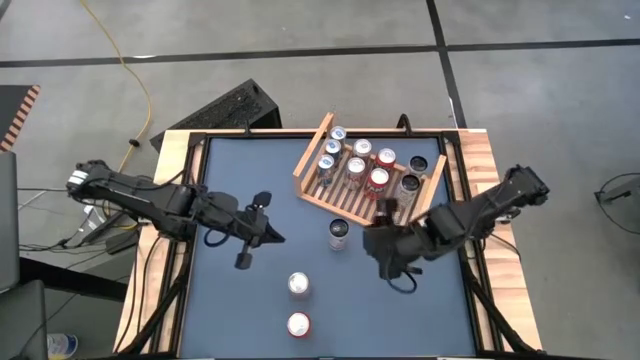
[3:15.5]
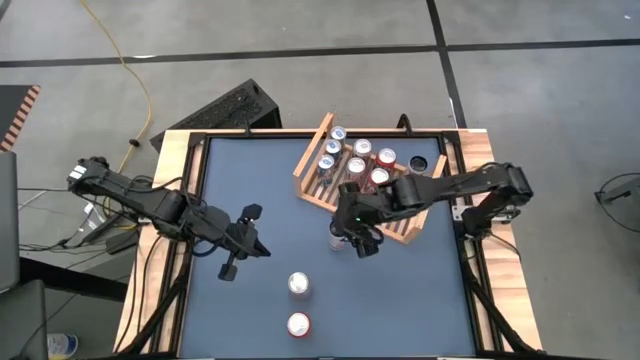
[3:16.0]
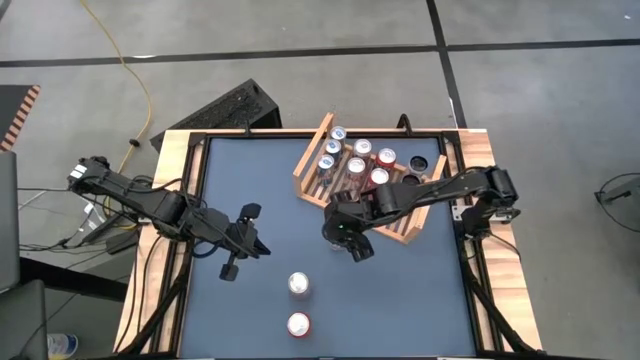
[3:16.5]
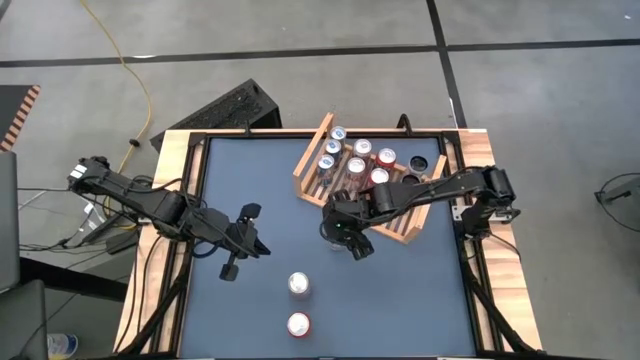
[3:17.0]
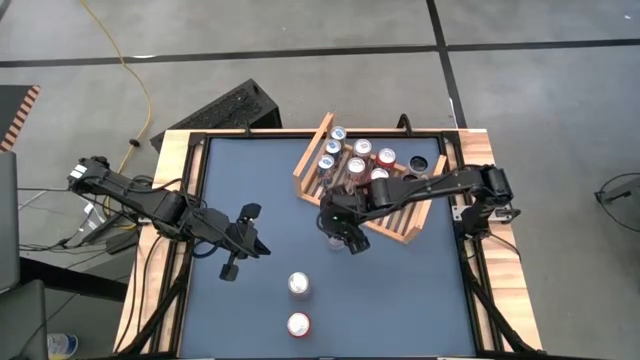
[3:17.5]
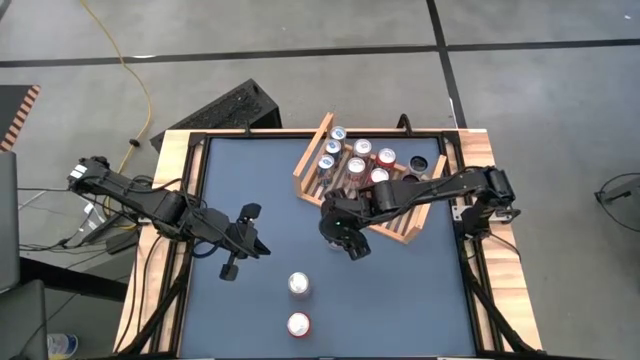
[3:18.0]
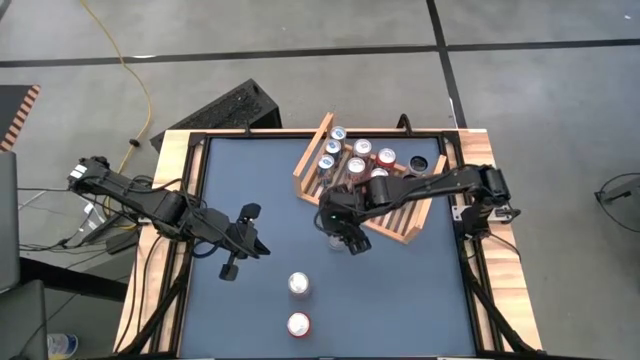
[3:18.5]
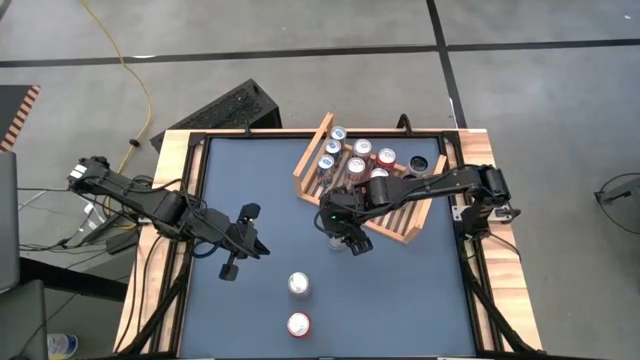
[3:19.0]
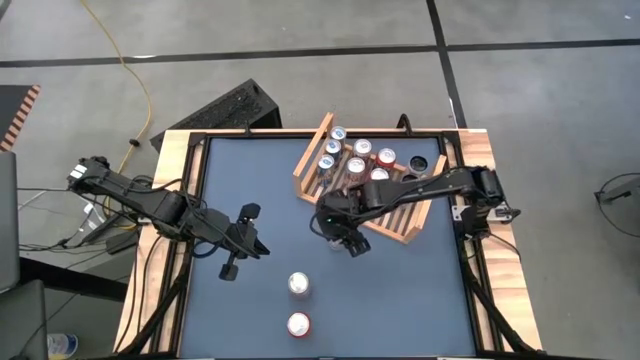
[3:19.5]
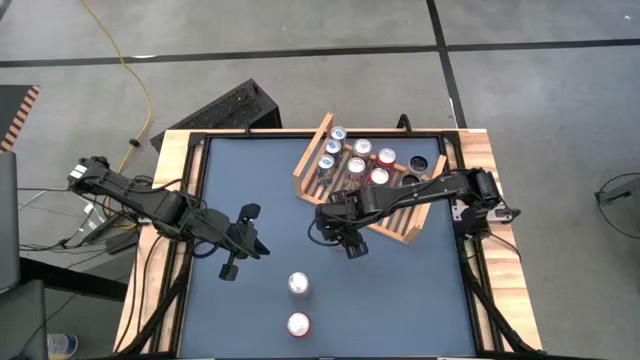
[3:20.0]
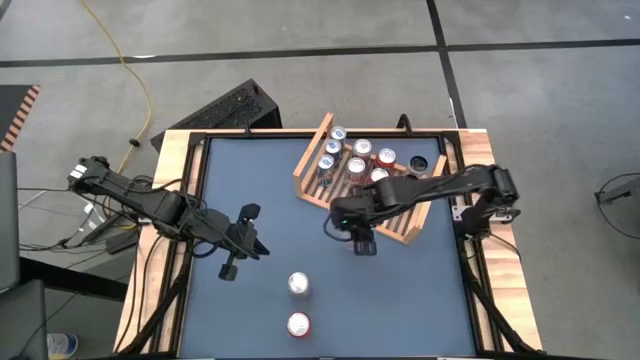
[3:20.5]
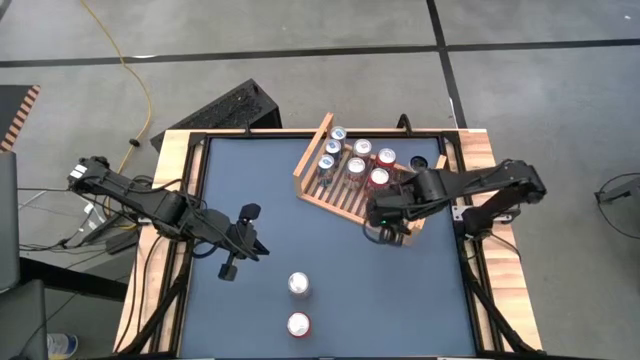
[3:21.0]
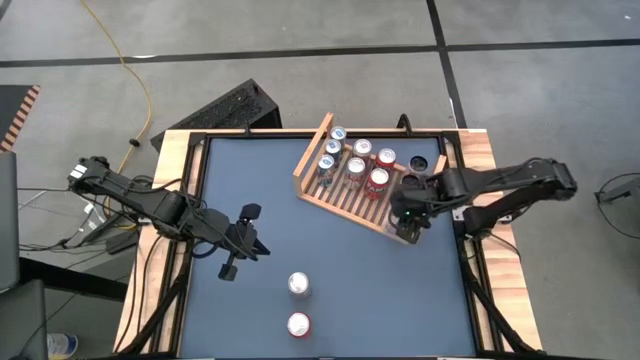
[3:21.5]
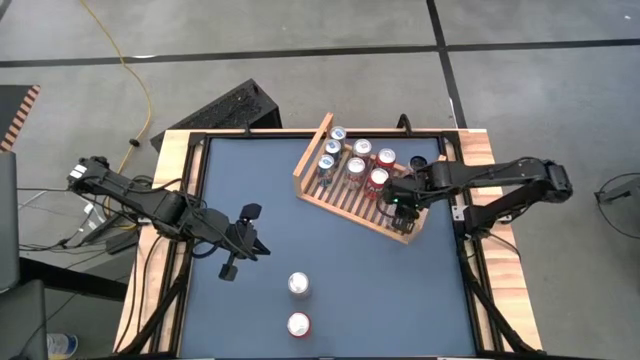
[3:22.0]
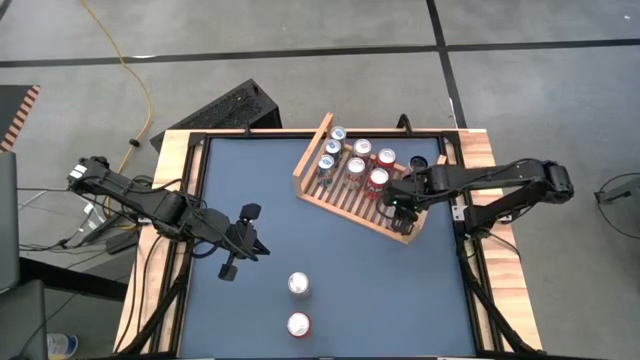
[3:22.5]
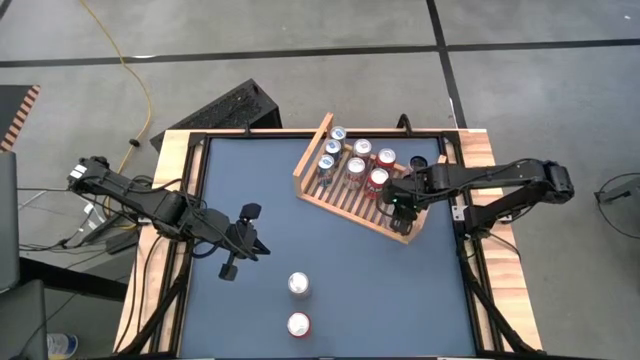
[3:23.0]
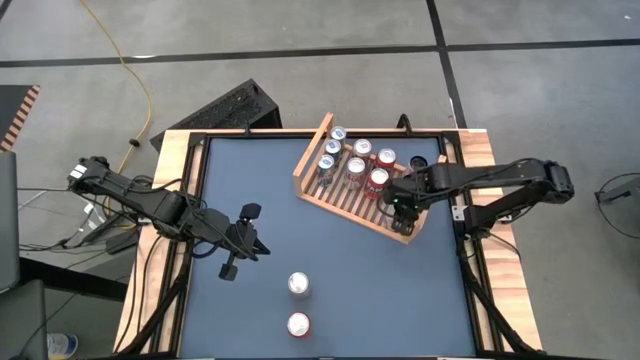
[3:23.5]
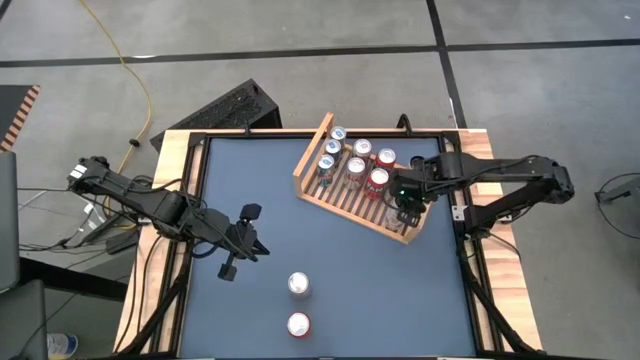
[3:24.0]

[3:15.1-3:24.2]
Task: Place canned beverage on shelf
Put the white and pink soda can aligned with the other white and pink soda cans on the shelf

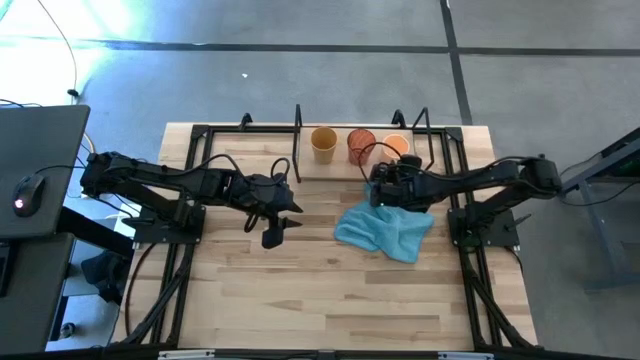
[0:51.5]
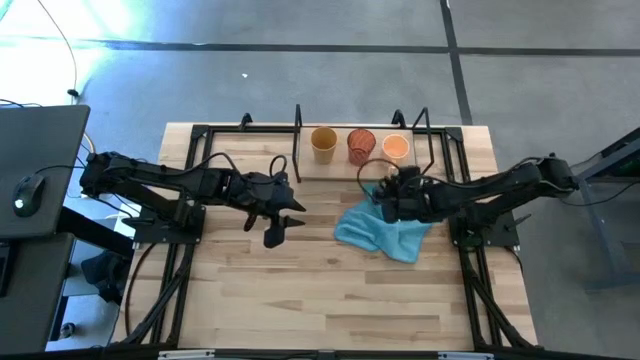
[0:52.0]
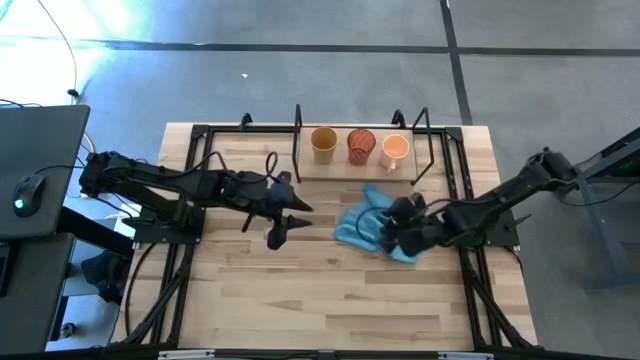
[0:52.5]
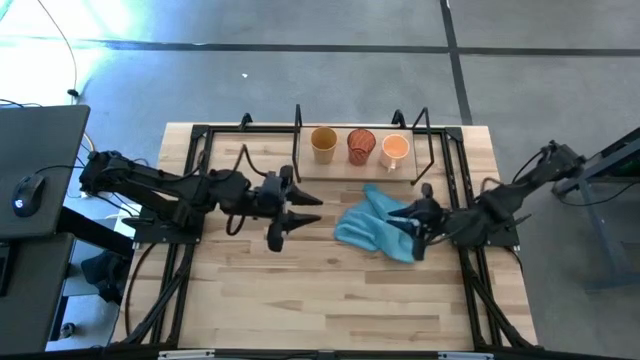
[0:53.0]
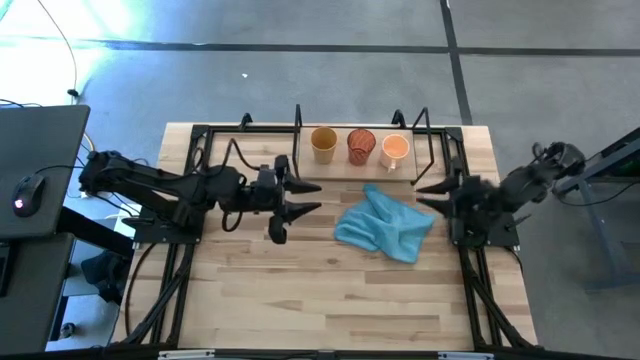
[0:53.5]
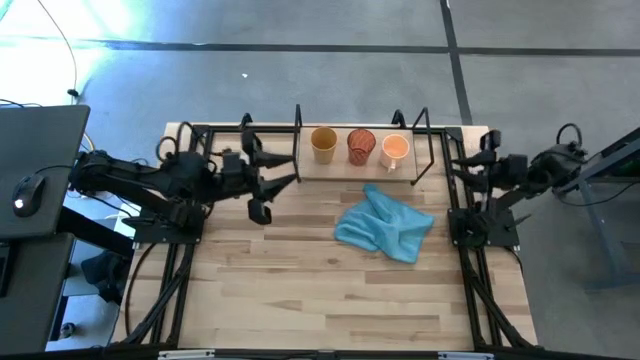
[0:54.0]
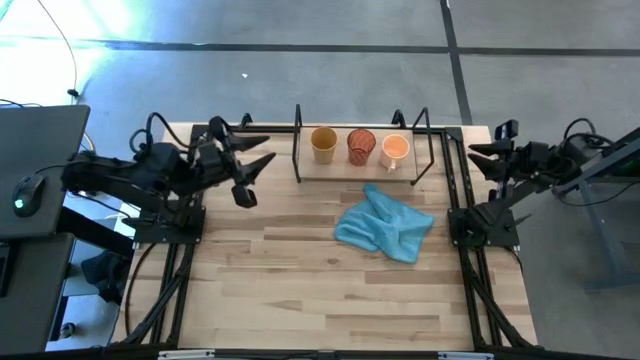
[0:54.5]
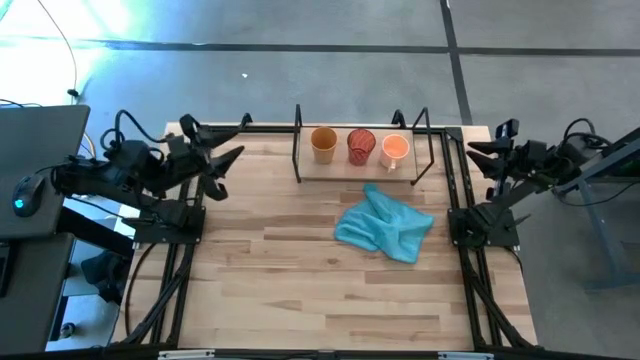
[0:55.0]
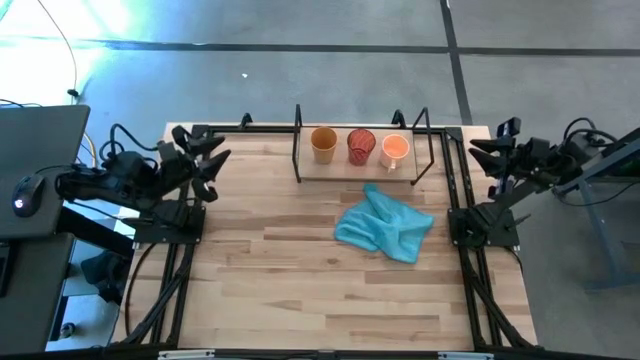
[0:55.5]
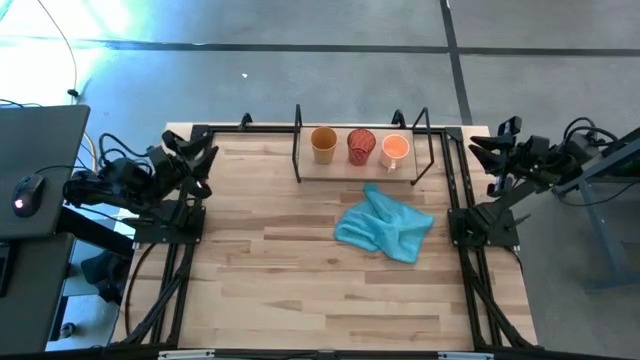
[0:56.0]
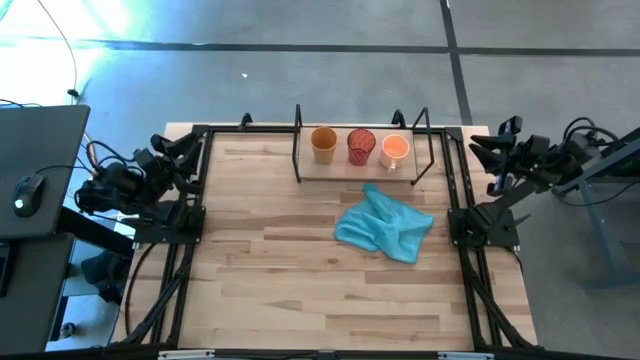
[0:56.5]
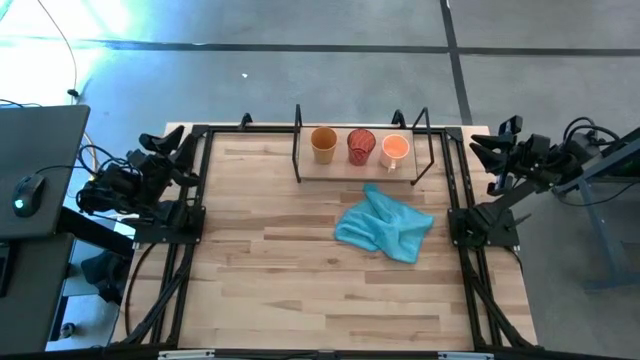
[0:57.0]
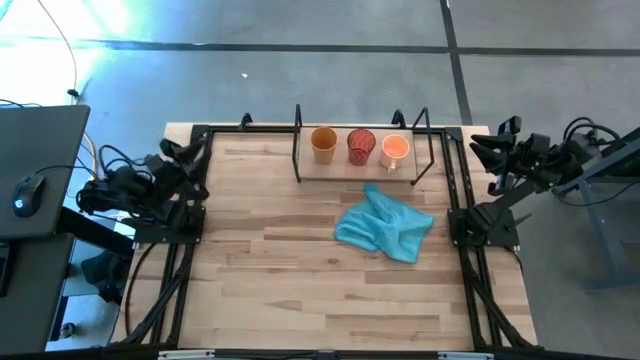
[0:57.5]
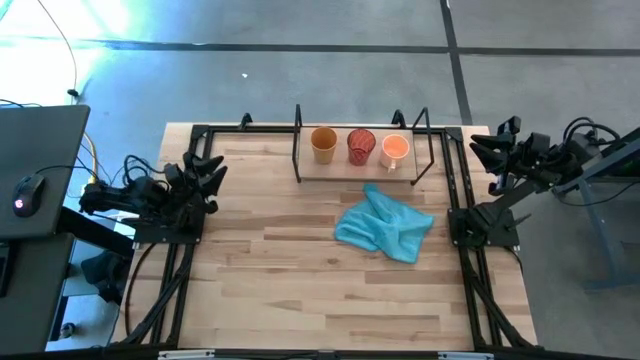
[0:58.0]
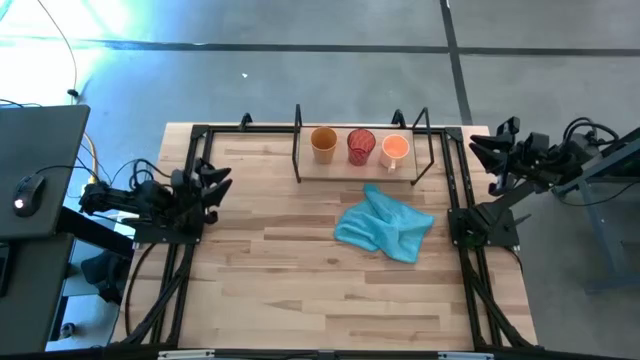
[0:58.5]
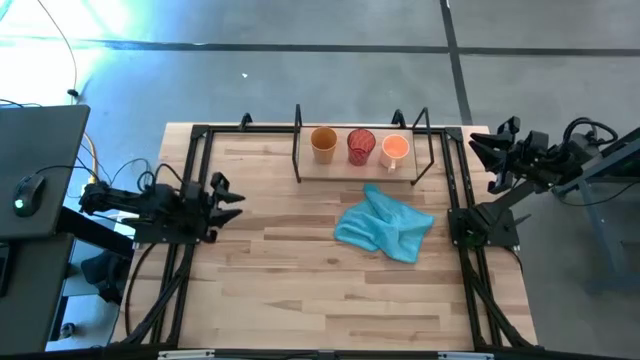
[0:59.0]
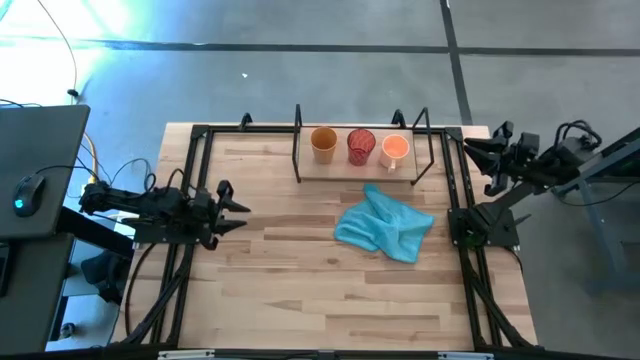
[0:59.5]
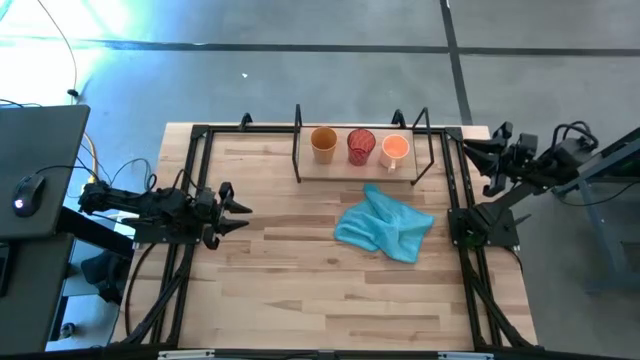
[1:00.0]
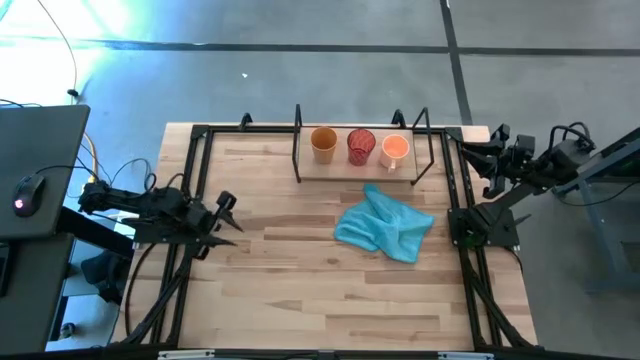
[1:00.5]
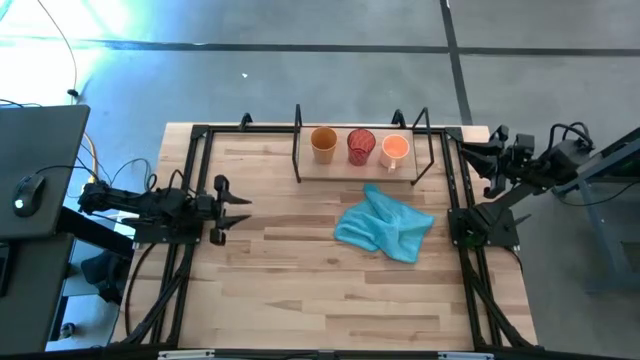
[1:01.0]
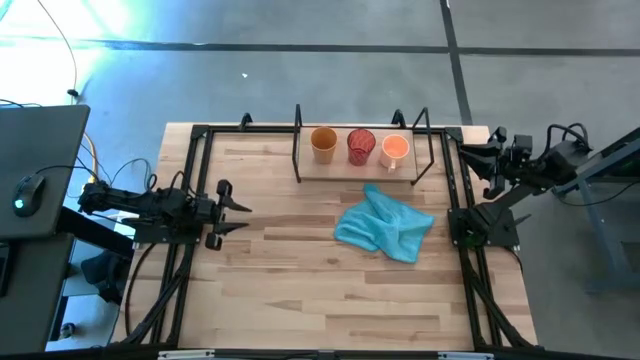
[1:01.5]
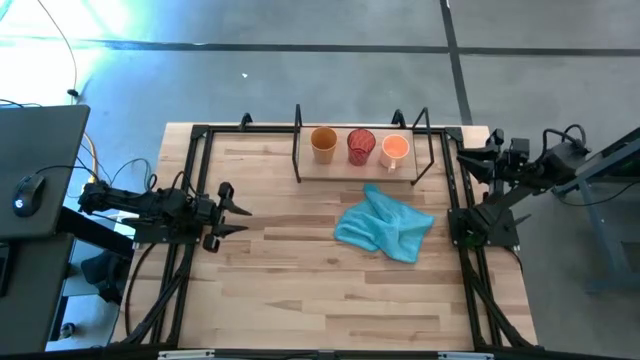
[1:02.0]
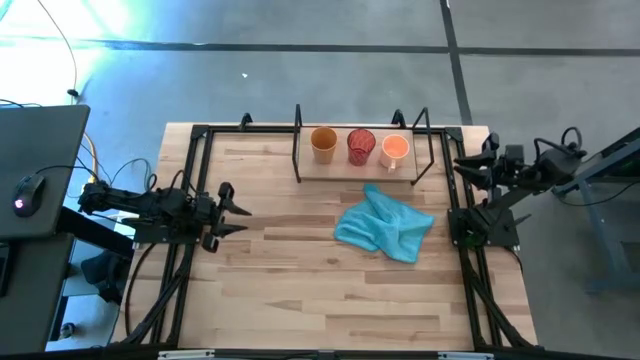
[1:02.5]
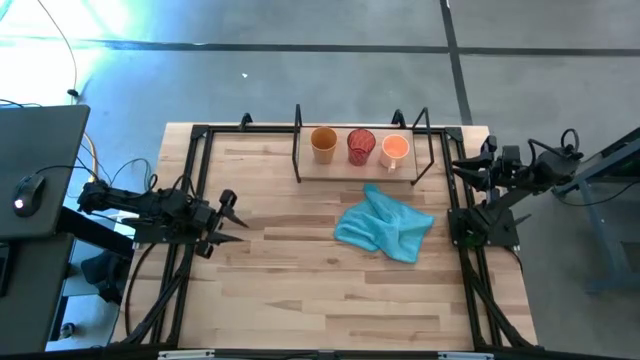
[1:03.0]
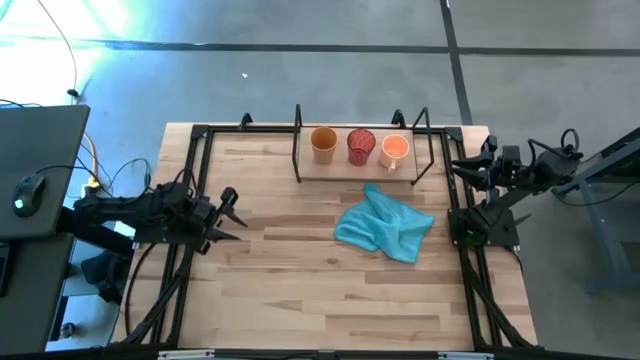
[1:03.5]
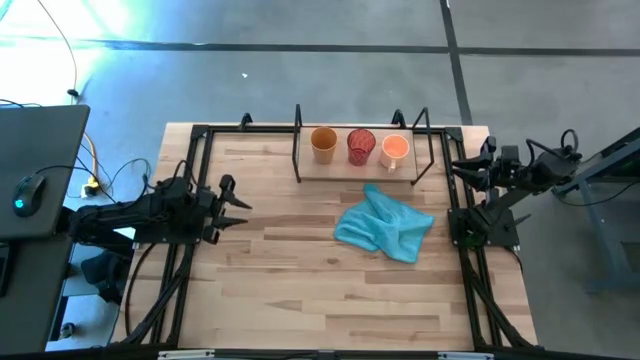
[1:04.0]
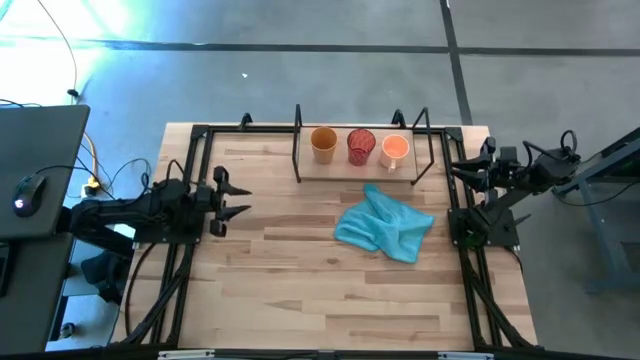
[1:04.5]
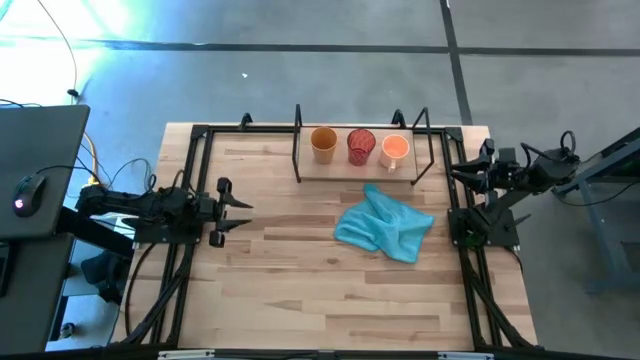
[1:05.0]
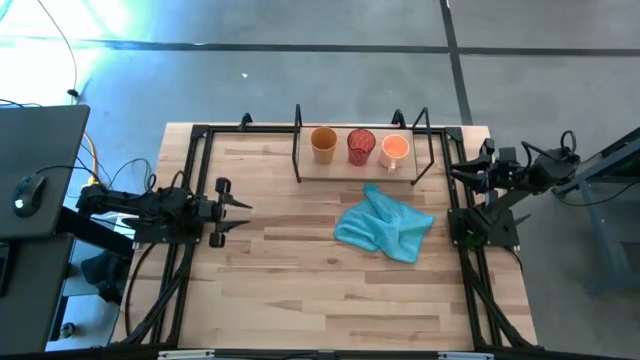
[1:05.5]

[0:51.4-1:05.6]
Task: Stack small to large cups/mugs on shelf
Return to Home Position
